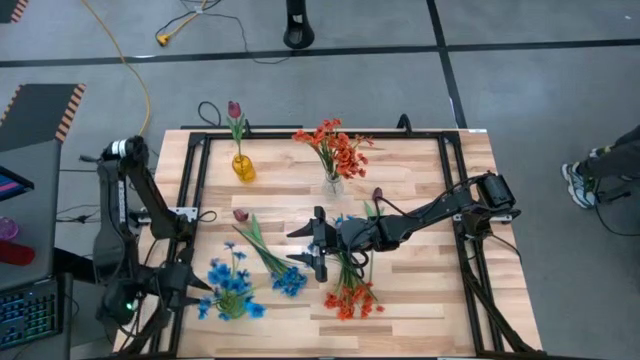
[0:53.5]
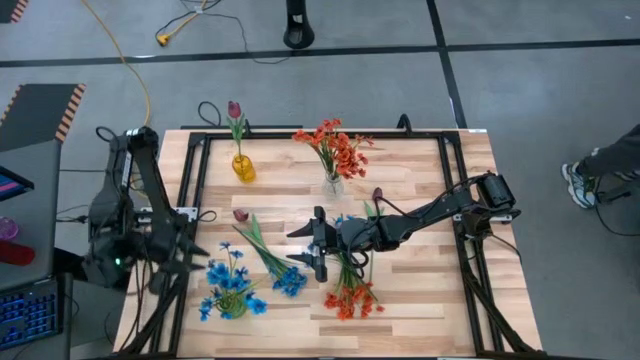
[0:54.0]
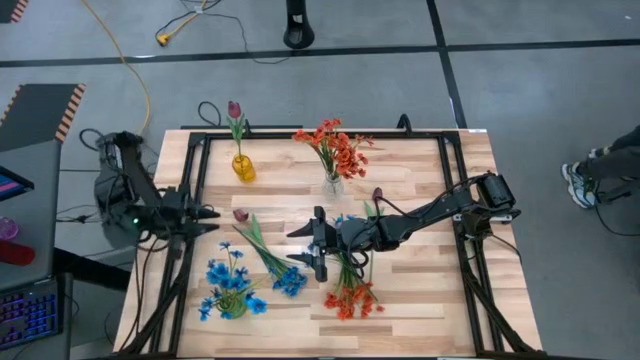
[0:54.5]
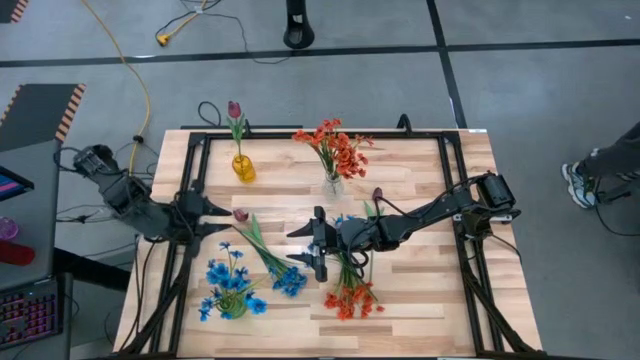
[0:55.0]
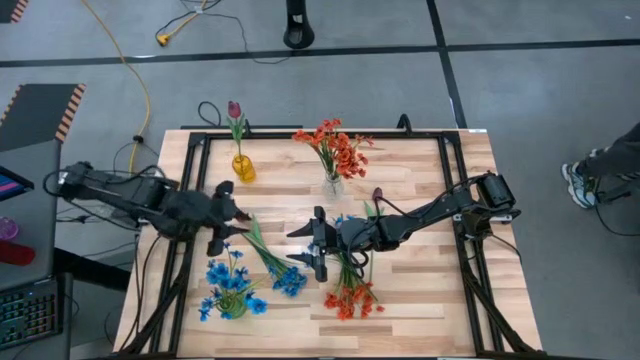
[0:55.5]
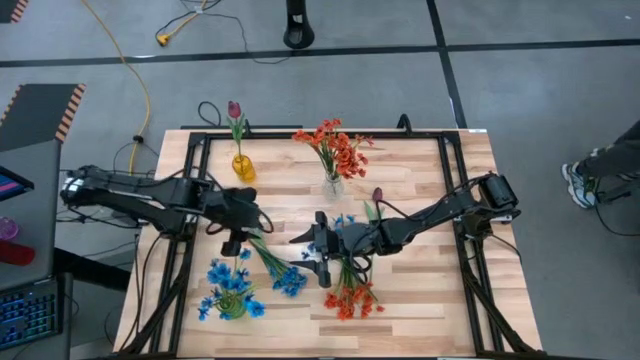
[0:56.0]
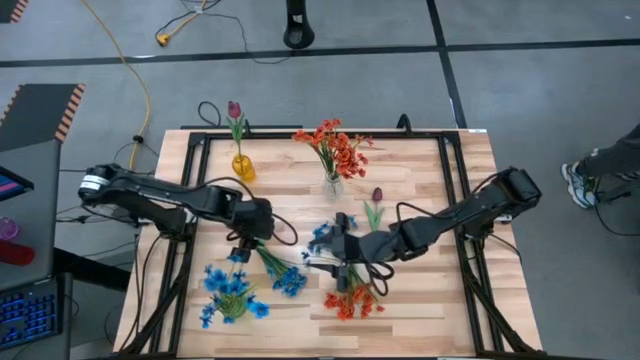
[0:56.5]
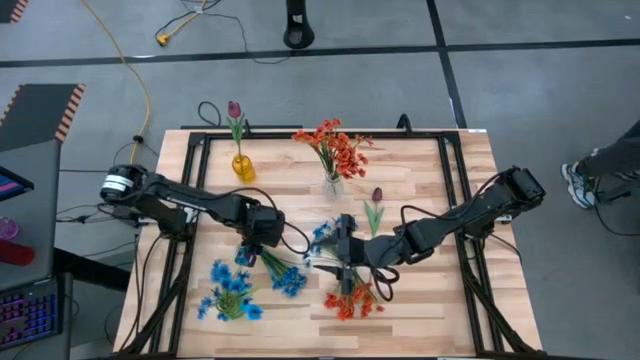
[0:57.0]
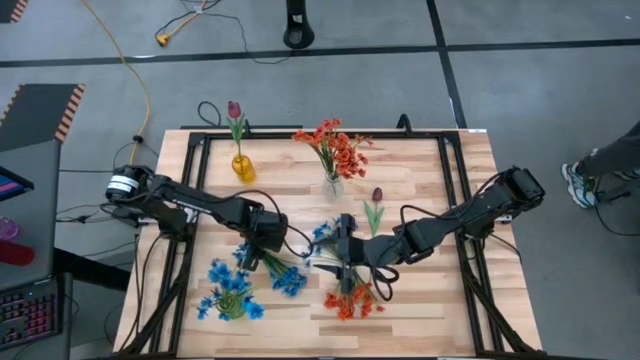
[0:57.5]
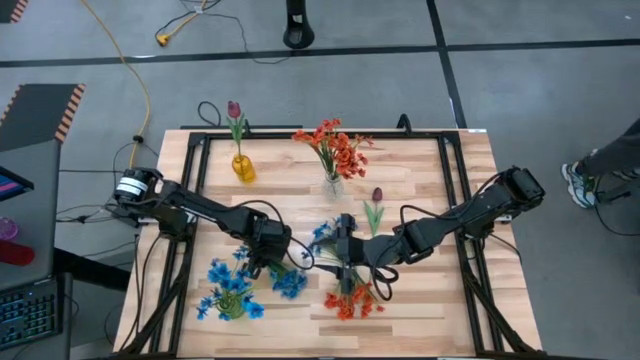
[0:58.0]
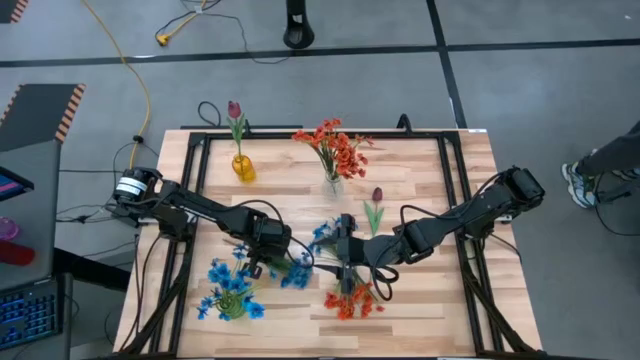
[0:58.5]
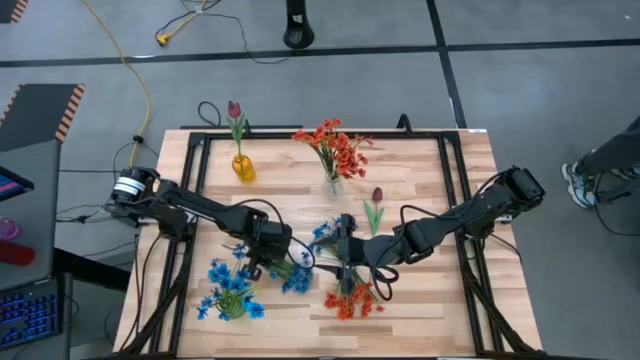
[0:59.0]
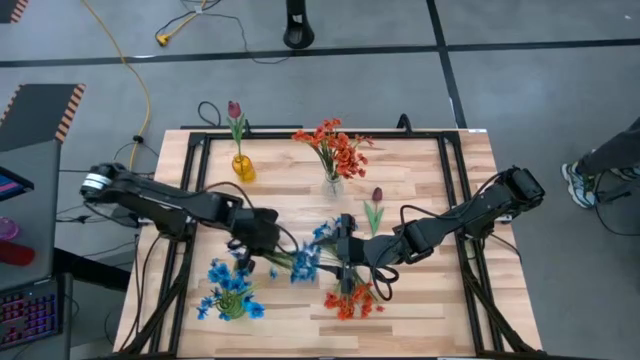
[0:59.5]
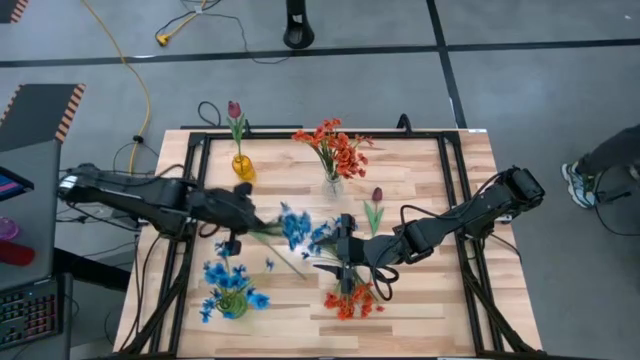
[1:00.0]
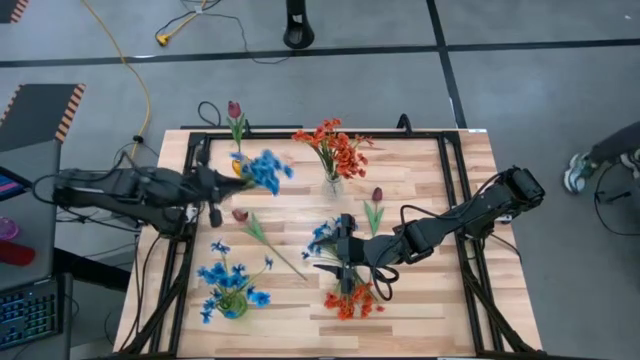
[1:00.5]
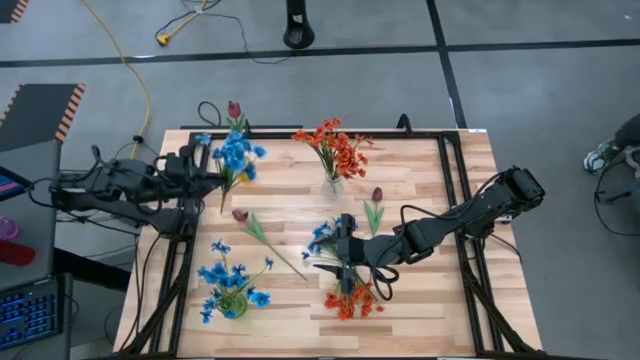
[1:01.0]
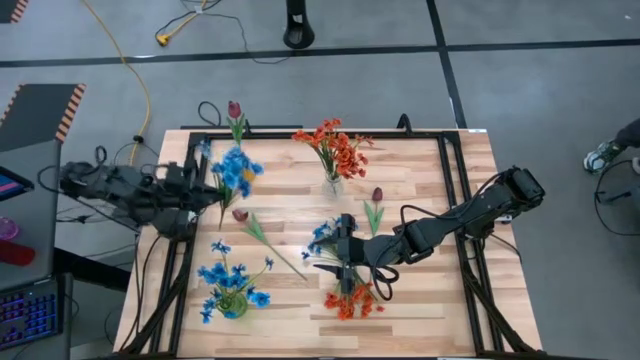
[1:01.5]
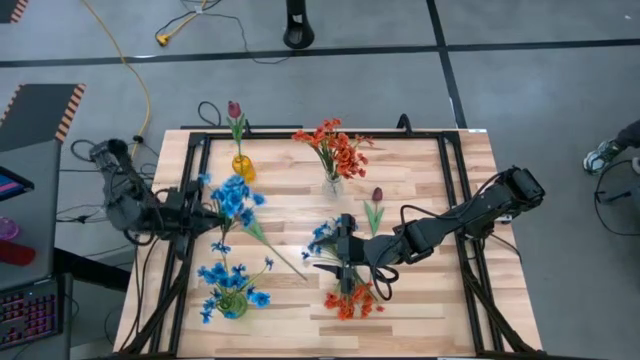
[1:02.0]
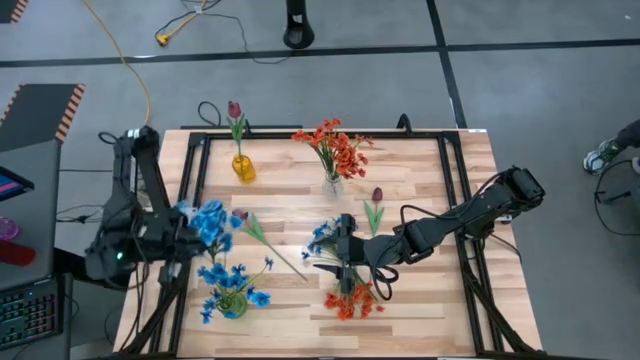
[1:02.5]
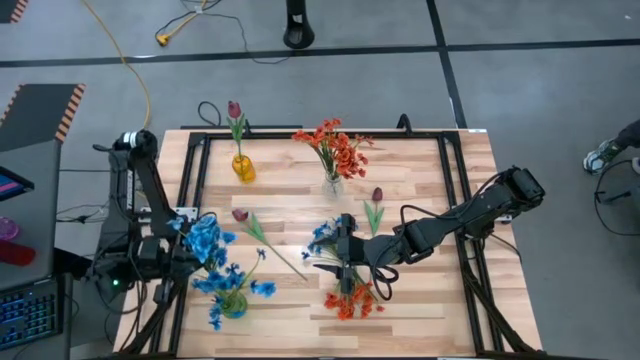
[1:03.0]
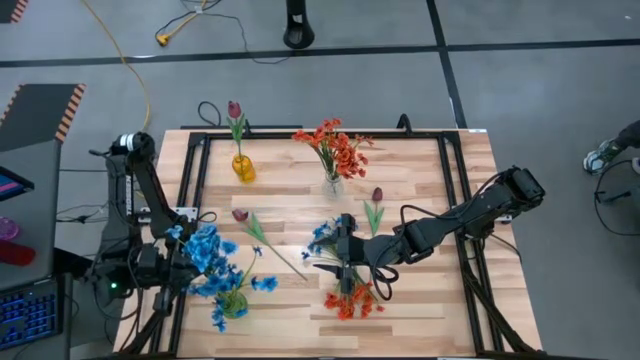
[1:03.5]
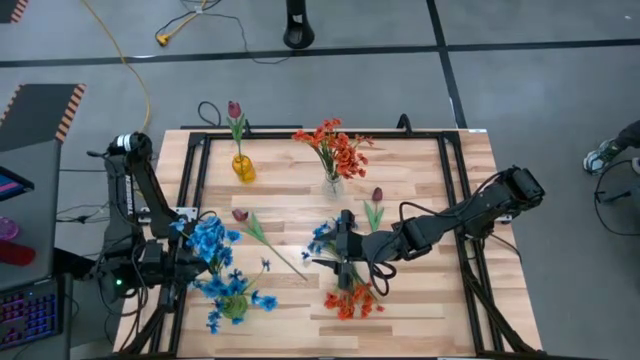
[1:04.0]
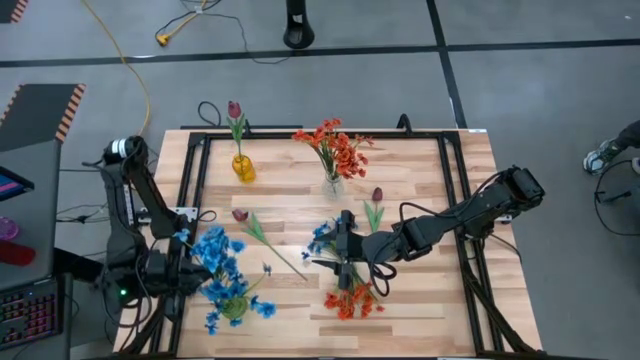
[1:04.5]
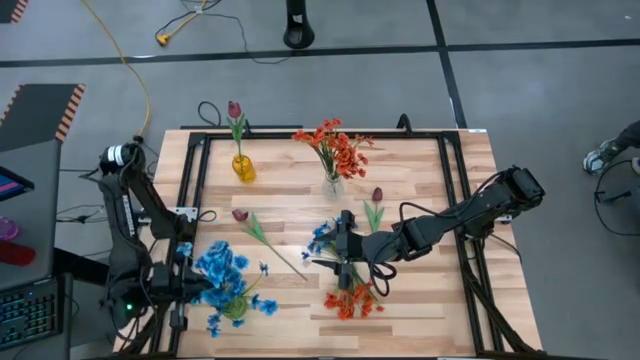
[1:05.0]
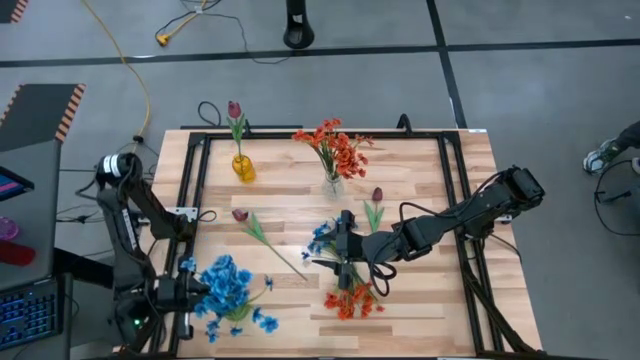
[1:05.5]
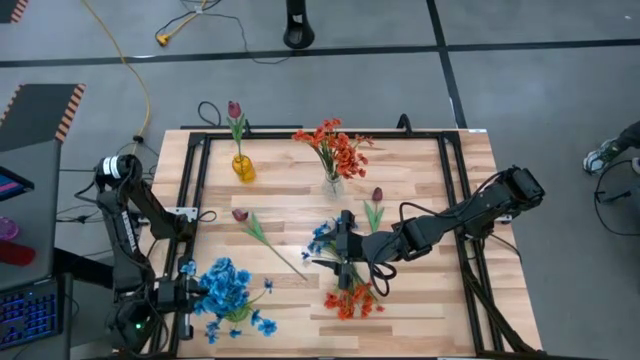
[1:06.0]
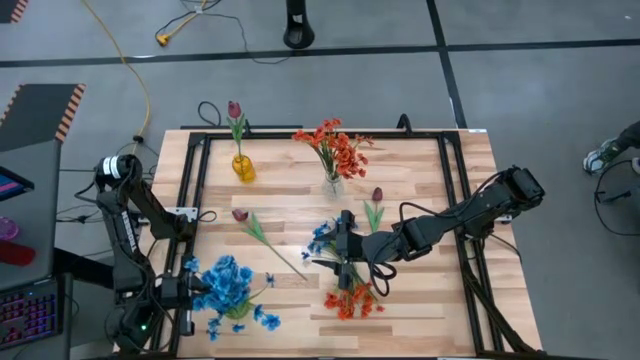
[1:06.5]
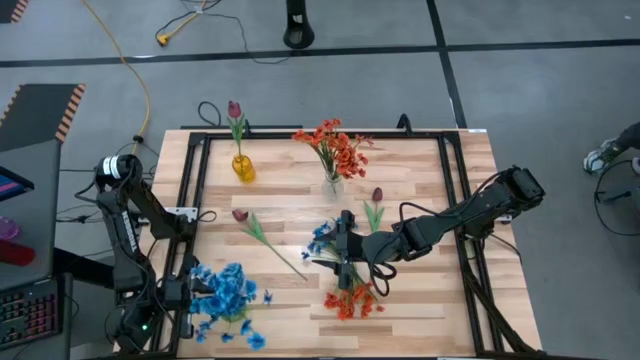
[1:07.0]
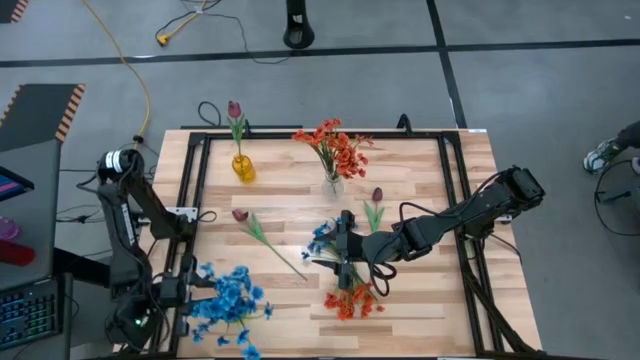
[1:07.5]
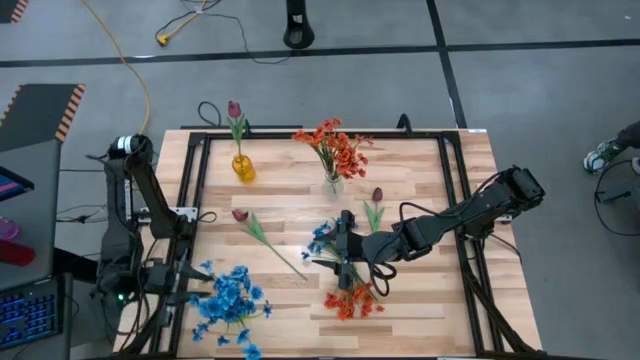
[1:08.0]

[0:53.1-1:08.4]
Task: Sort flowers into vase by color
Put the left blue flowers into the green vase

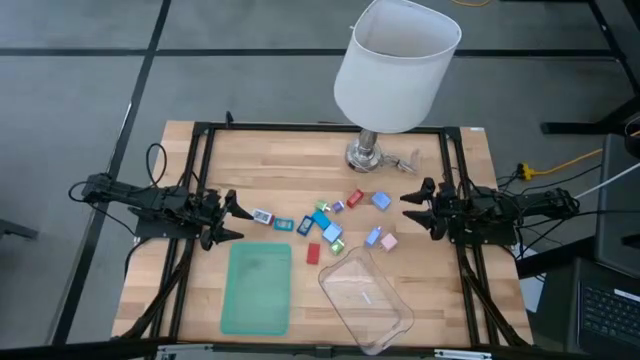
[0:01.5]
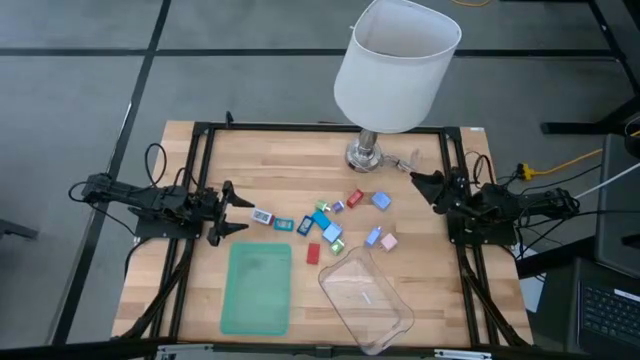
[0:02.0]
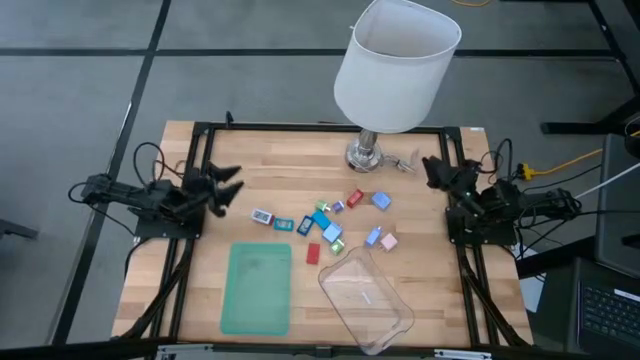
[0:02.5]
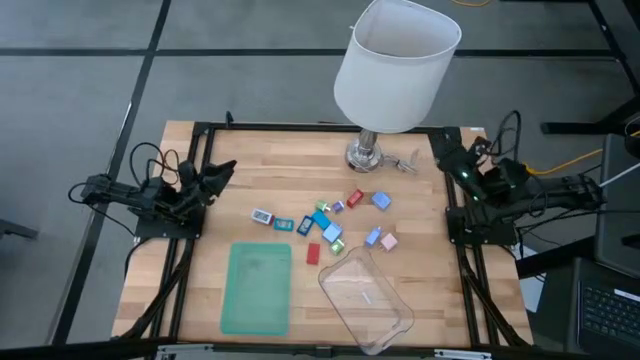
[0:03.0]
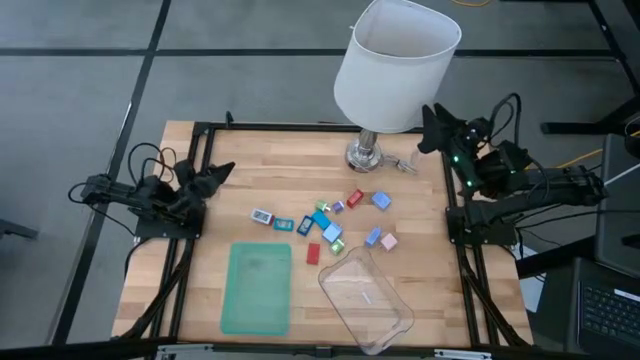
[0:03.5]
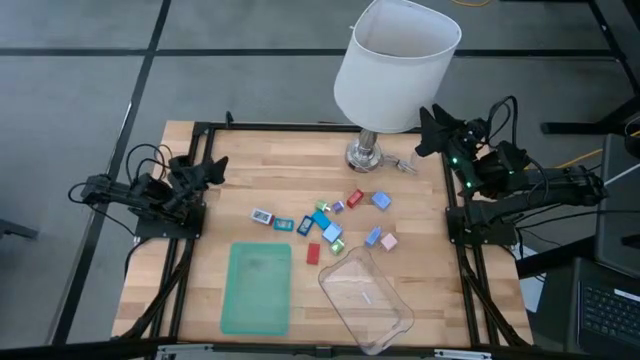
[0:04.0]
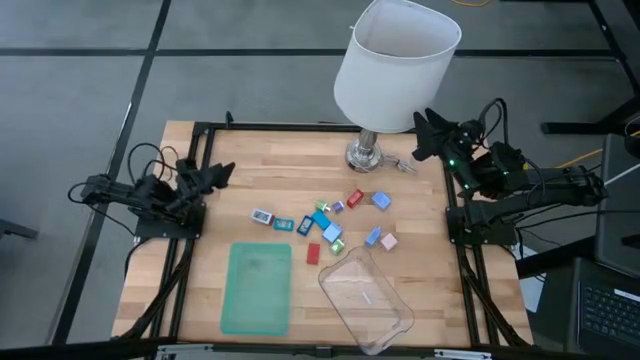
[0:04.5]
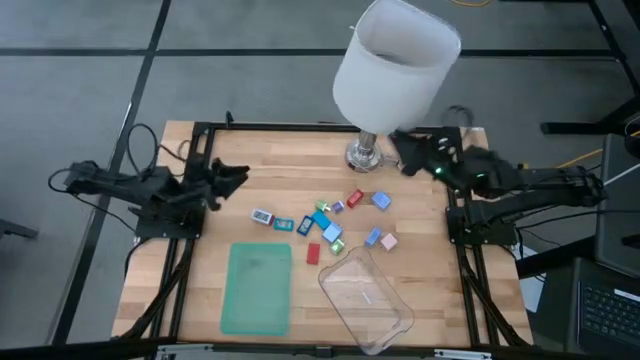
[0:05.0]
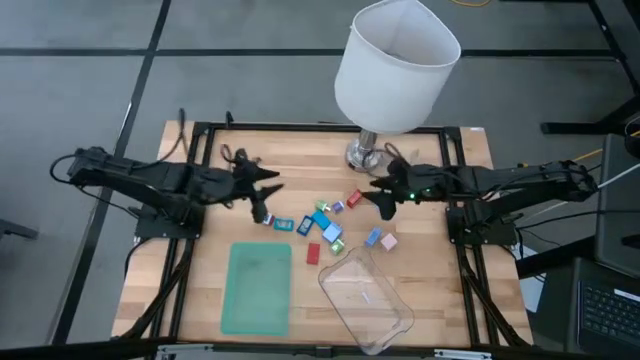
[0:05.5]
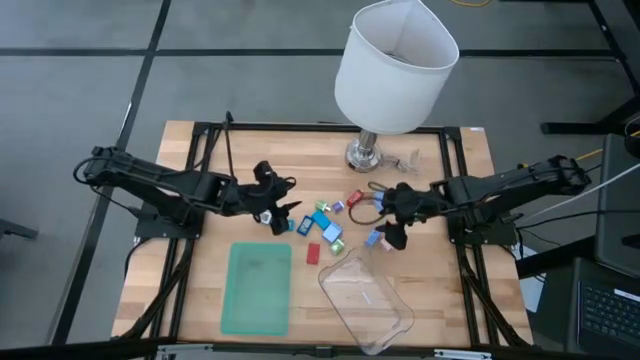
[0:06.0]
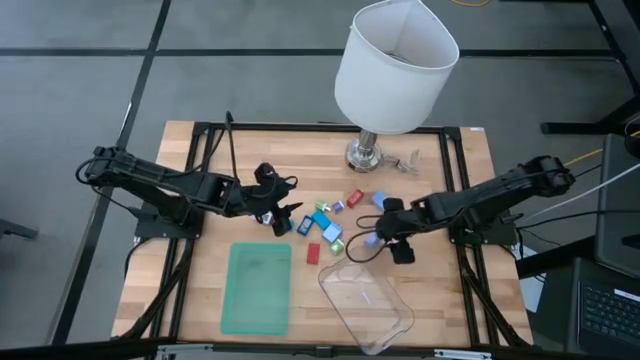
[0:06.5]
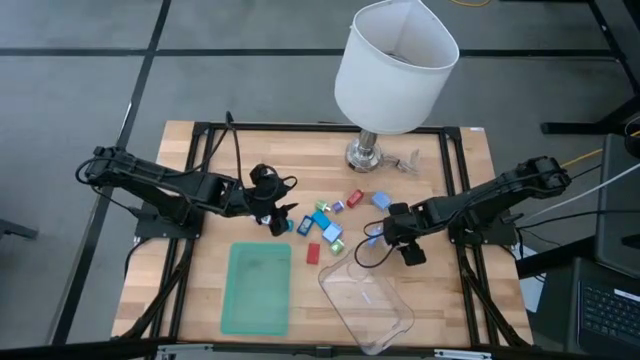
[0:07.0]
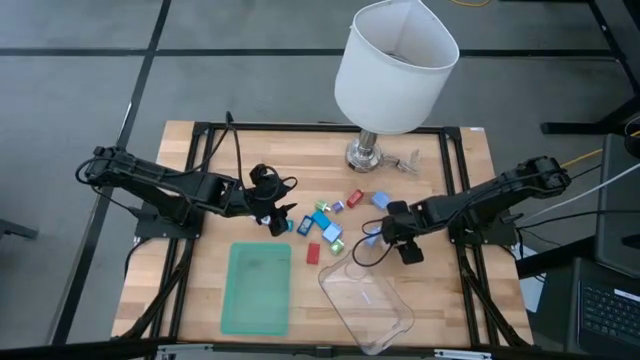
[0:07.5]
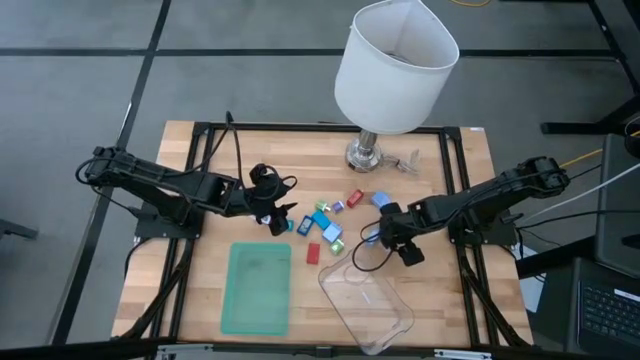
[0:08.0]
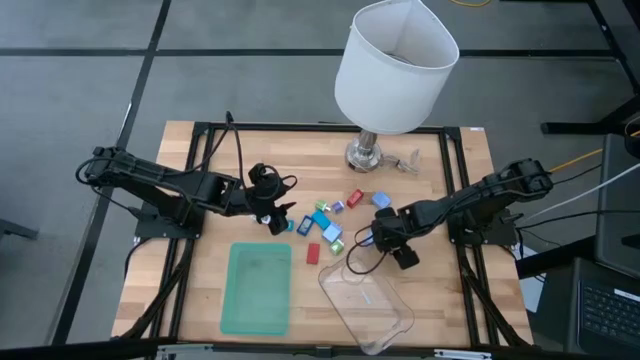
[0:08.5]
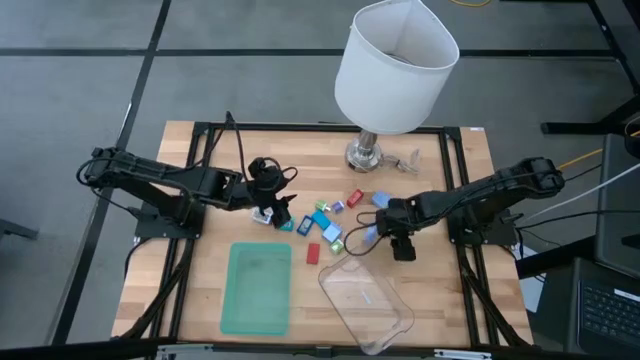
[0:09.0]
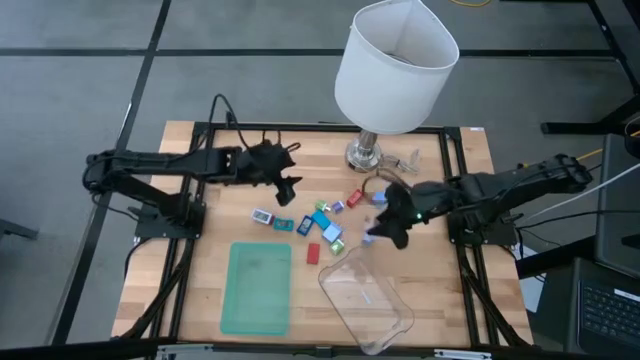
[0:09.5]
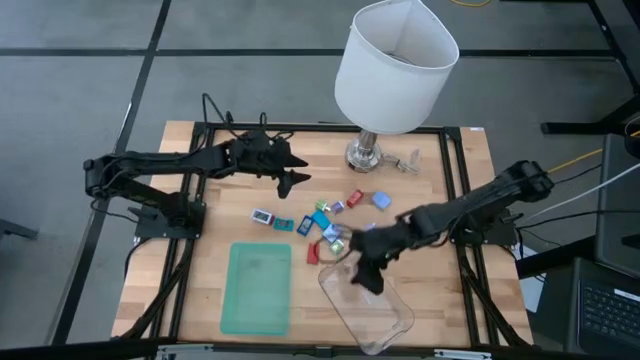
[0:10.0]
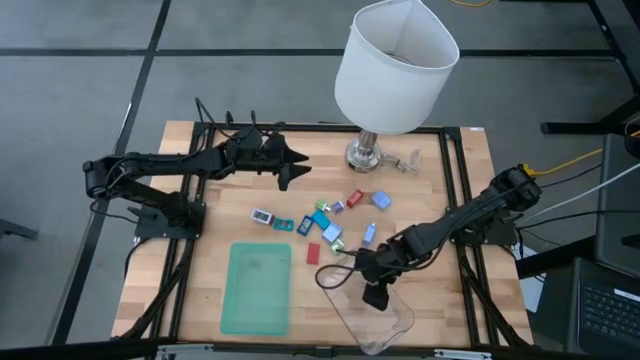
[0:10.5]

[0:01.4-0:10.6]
Task: Pick & Place Office items
Put the pink charger adapter into the transparent bin
